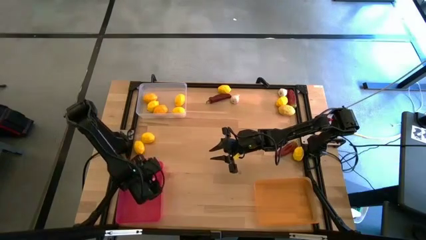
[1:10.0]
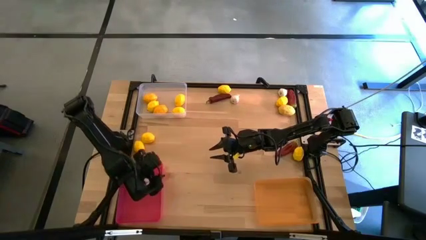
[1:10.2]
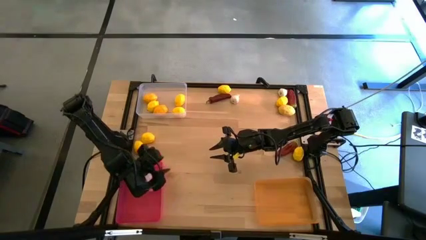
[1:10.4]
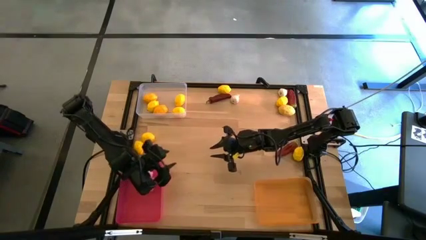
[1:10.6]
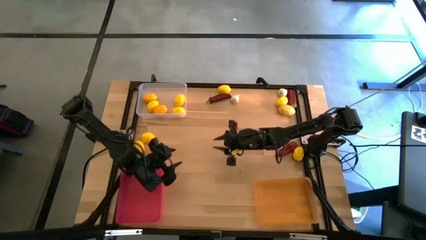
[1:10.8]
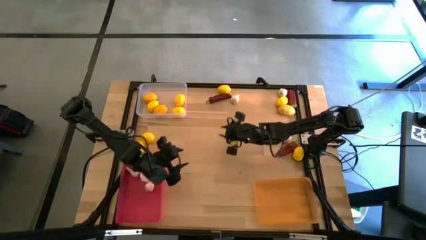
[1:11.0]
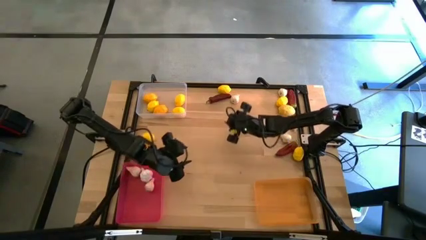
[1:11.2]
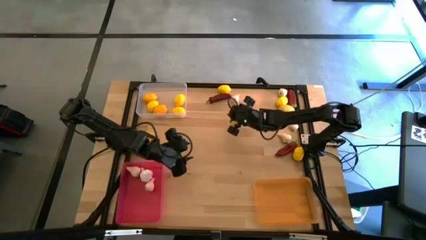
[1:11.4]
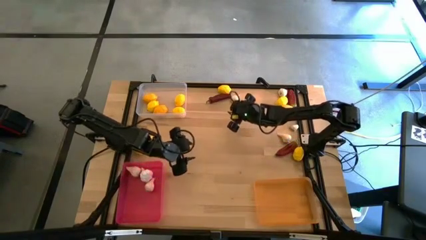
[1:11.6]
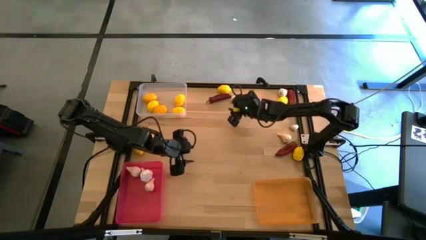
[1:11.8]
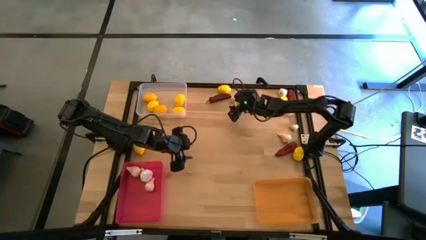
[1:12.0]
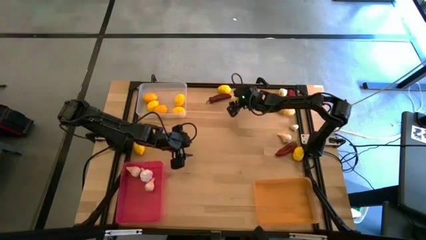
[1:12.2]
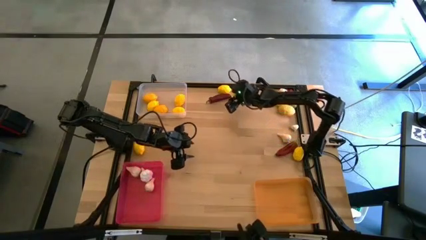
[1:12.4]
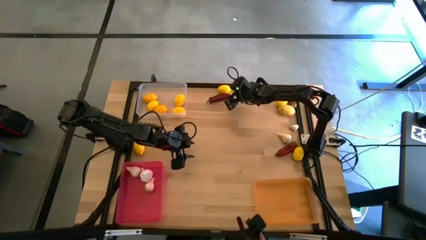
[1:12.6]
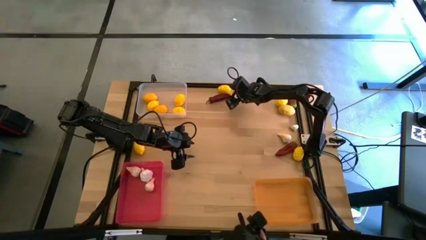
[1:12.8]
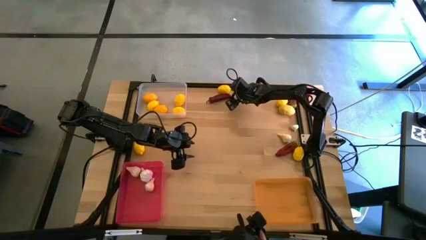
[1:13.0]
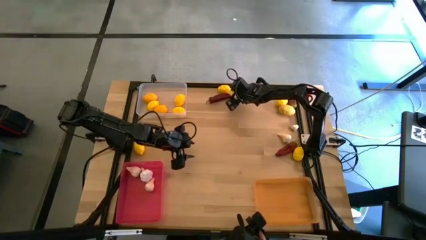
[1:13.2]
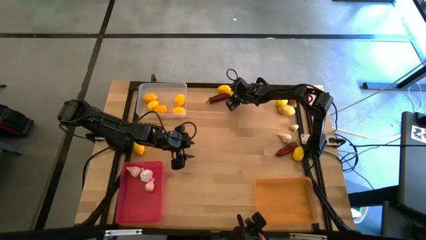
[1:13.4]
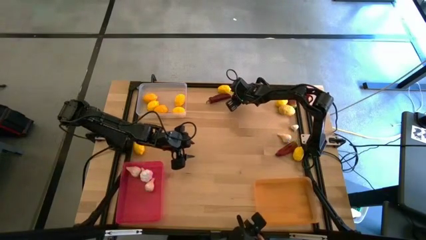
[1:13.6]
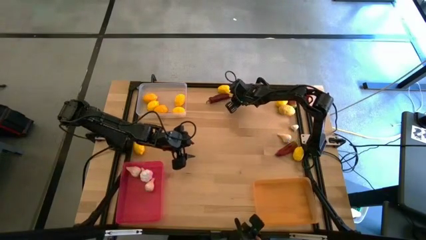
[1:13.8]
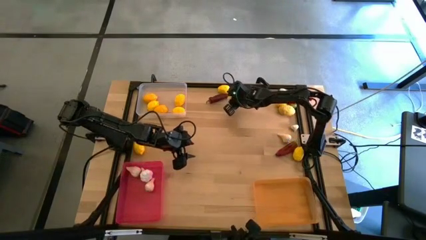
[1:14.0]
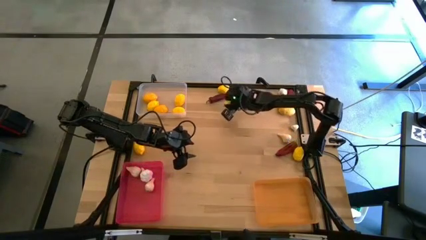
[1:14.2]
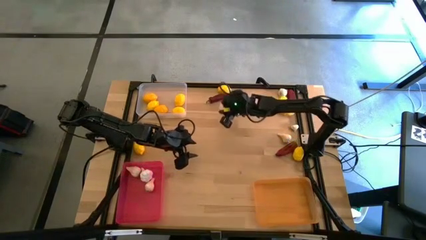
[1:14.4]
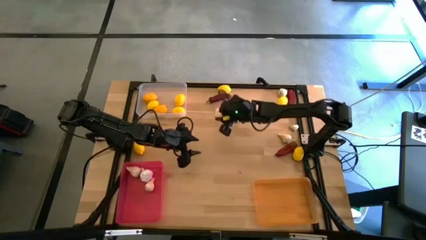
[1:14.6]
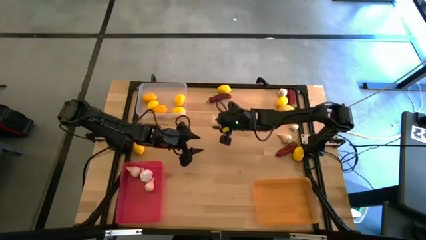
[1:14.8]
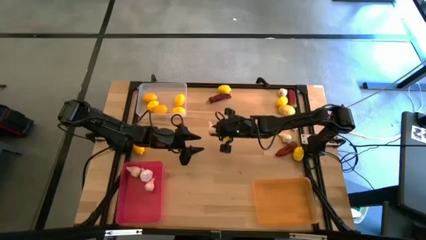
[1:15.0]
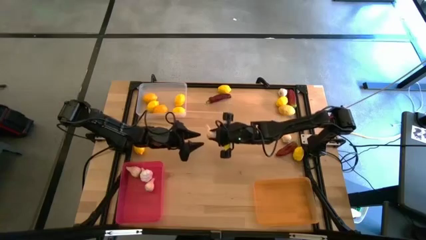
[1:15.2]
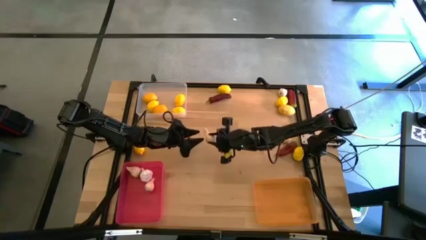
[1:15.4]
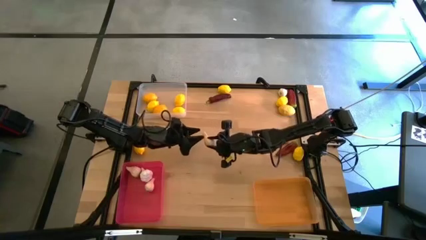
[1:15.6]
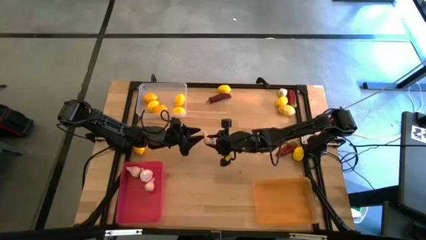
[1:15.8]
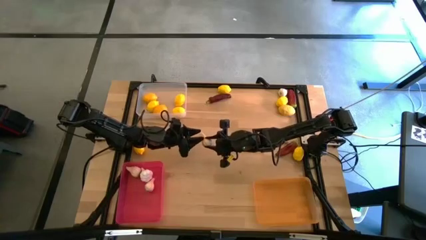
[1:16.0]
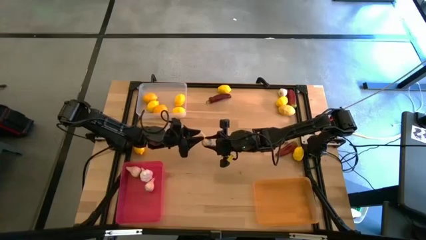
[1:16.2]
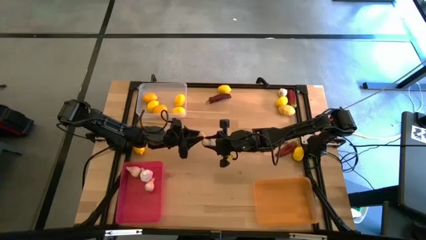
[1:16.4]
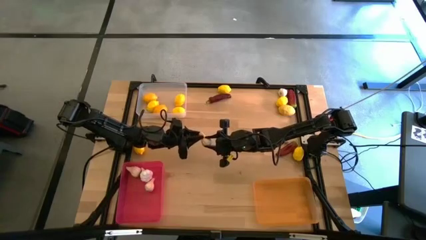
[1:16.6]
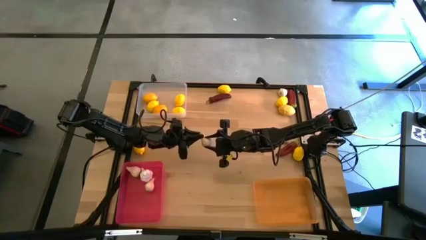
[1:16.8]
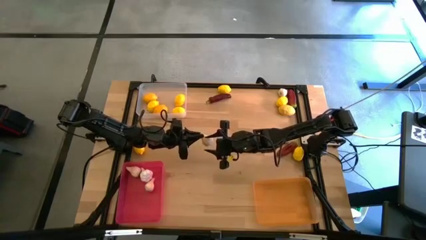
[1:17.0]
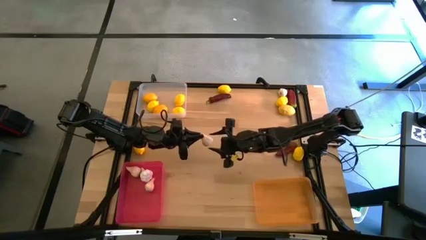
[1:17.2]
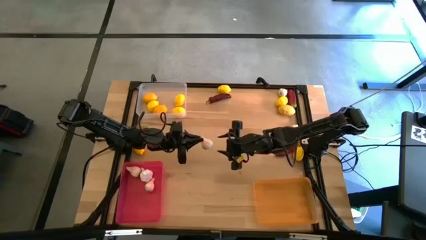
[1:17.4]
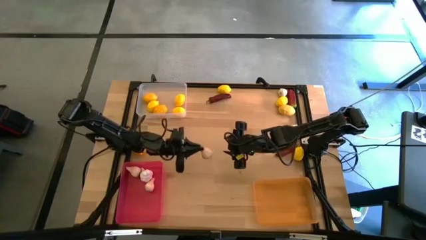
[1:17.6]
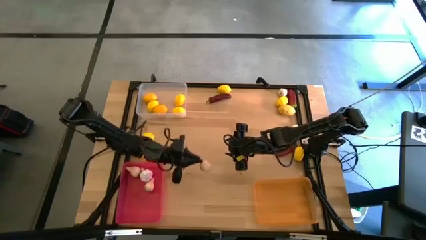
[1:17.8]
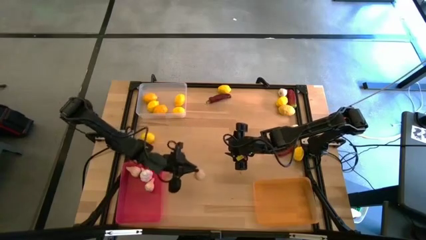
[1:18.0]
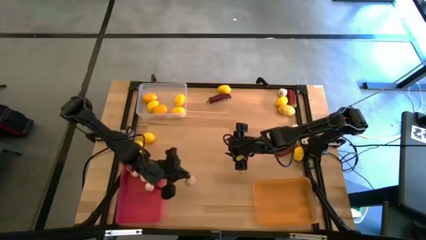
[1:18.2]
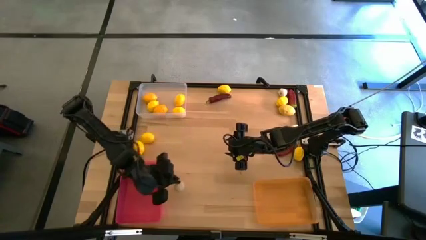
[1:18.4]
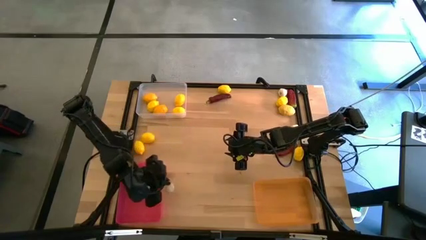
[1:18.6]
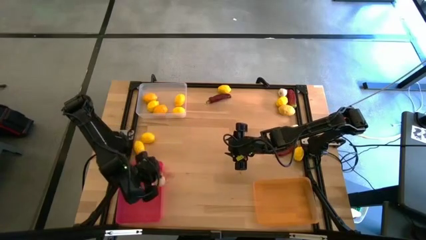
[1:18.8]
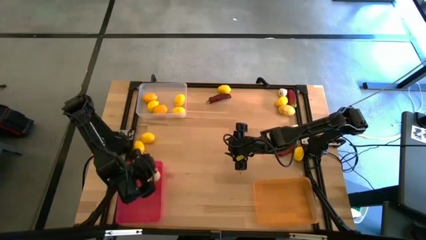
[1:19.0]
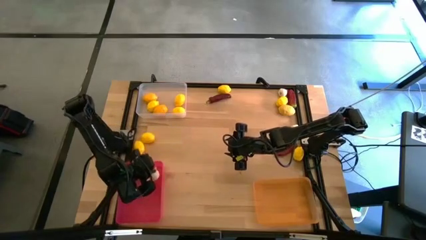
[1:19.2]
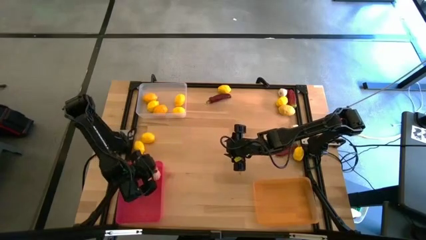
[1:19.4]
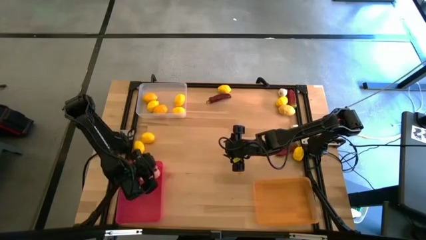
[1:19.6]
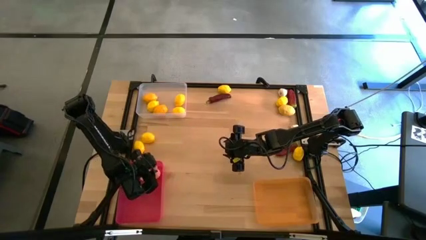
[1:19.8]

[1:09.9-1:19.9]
Task: Sort produce into baskets
Put the white garlic into the bottom left red bin

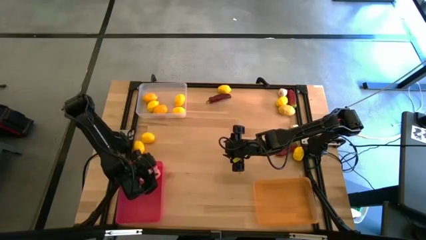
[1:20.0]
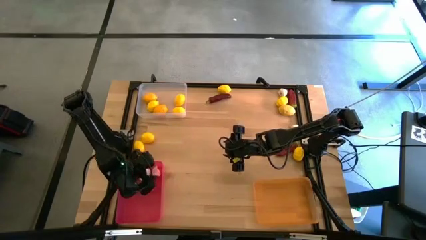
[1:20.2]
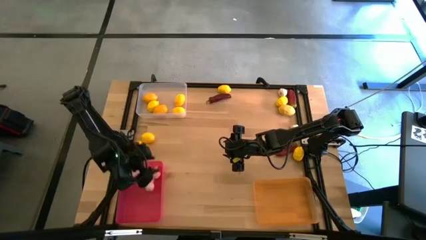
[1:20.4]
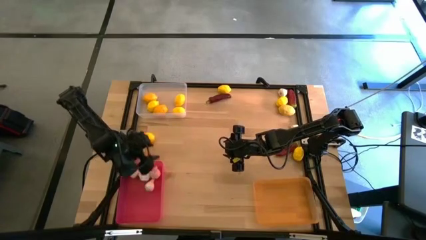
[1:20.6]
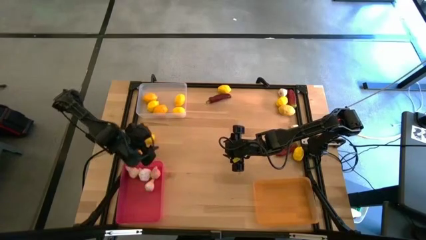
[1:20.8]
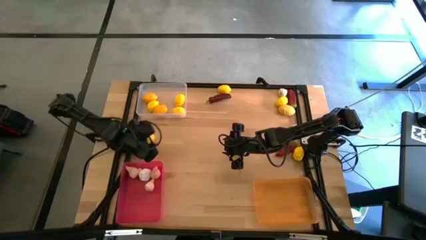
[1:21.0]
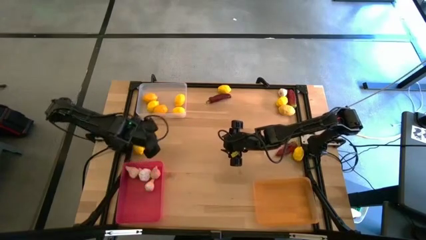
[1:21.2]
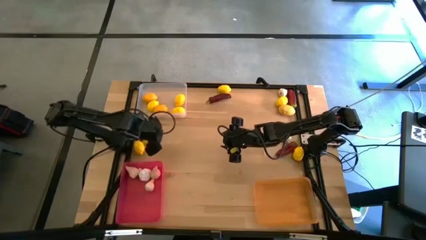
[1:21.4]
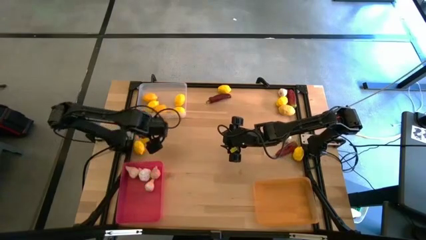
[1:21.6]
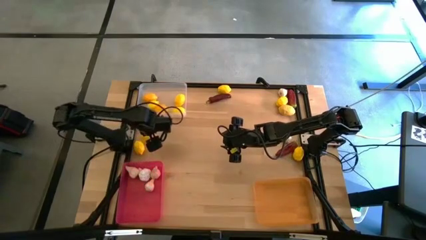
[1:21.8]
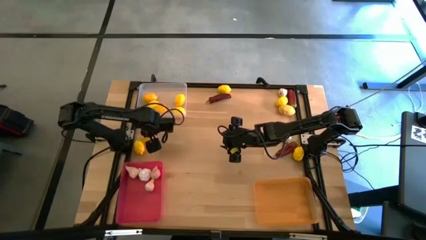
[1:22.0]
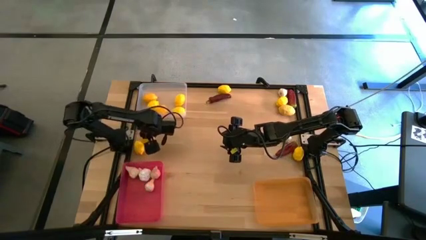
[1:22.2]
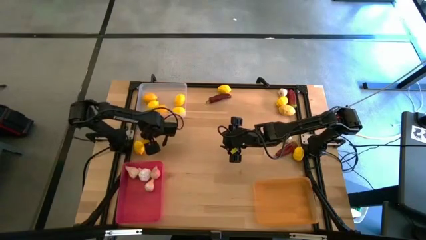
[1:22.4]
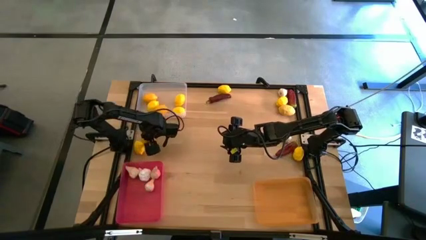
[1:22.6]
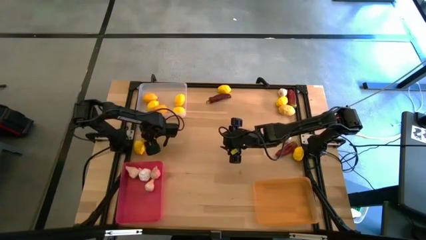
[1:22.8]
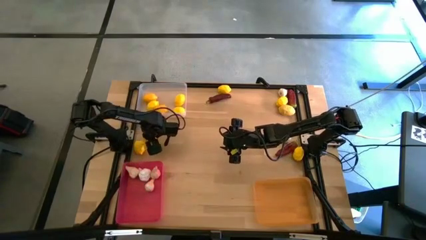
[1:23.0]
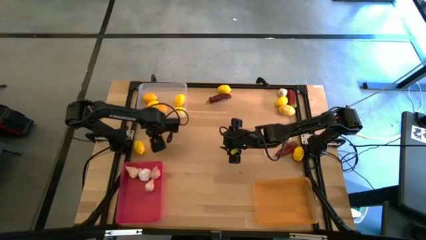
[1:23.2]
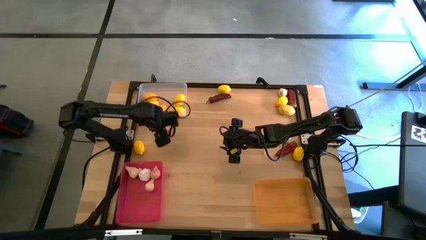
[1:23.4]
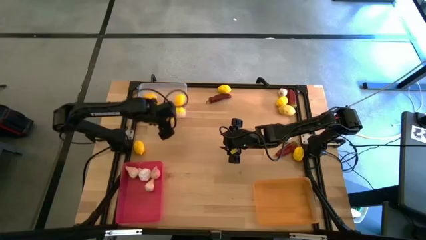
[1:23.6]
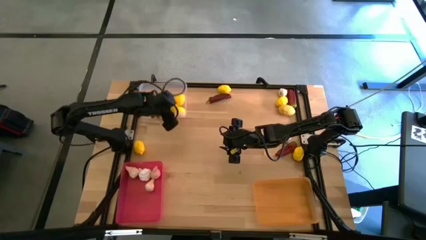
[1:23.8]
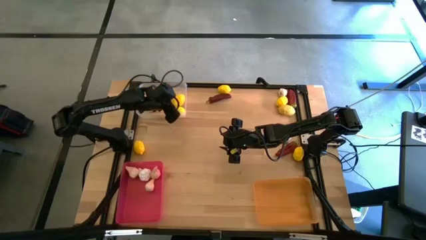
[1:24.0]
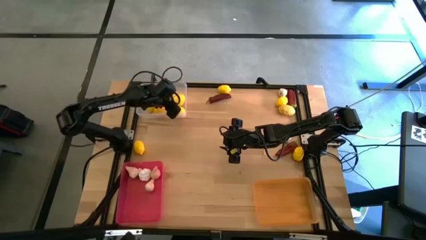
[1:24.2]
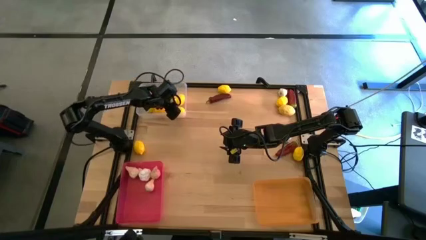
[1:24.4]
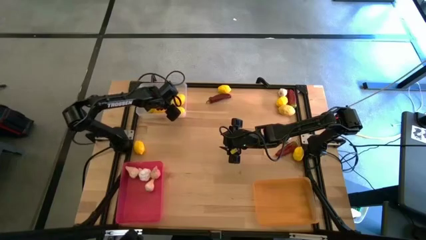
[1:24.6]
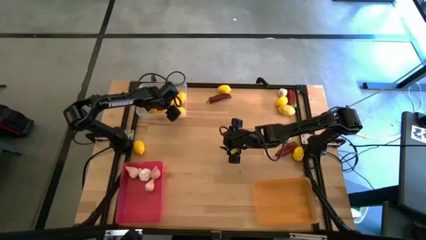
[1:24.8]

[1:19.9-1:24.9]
Put the yellow lemon into the left white bin

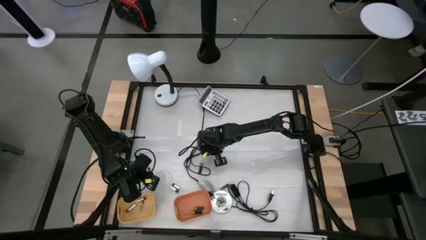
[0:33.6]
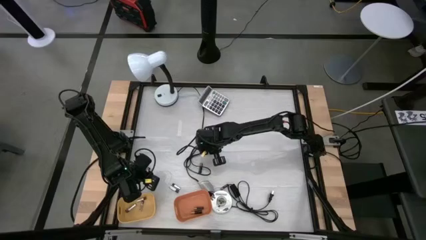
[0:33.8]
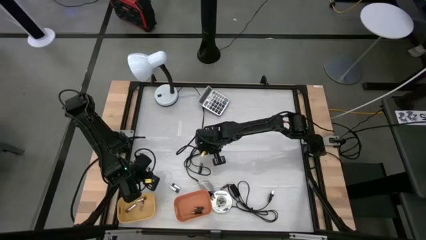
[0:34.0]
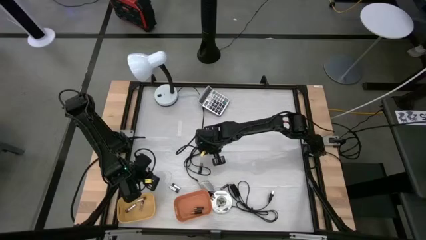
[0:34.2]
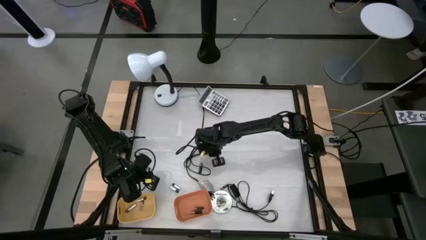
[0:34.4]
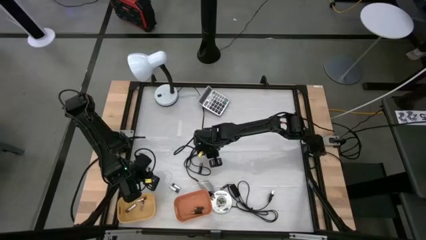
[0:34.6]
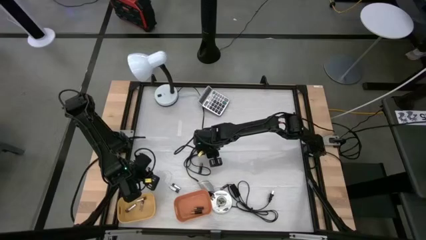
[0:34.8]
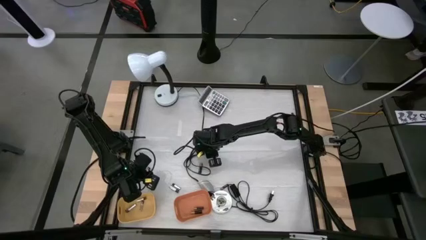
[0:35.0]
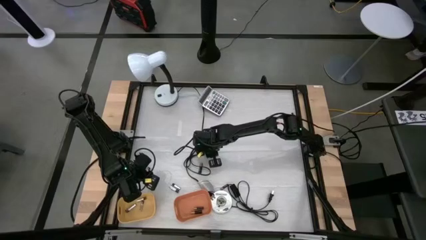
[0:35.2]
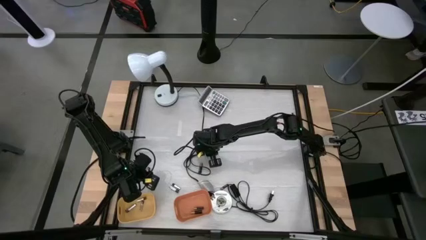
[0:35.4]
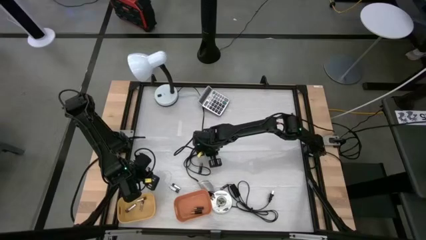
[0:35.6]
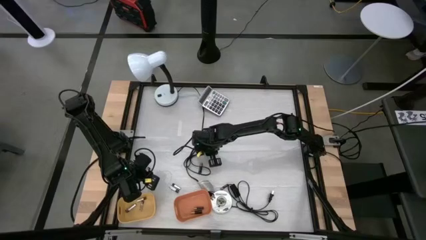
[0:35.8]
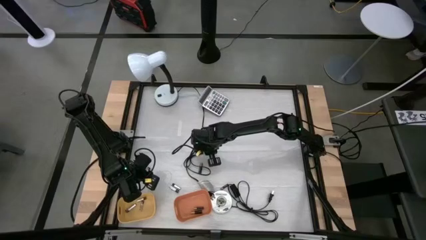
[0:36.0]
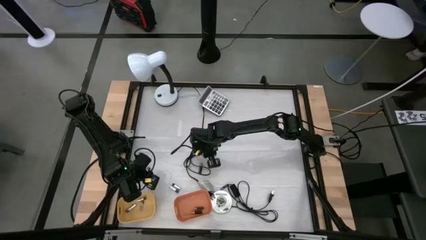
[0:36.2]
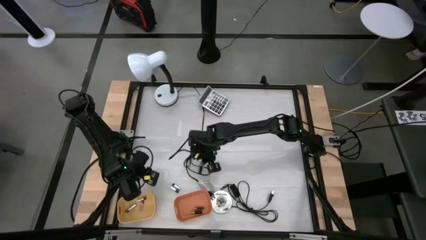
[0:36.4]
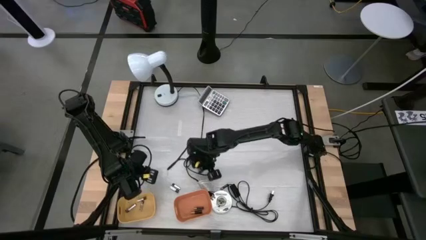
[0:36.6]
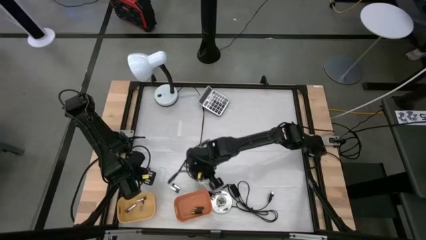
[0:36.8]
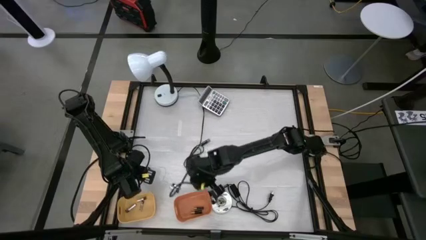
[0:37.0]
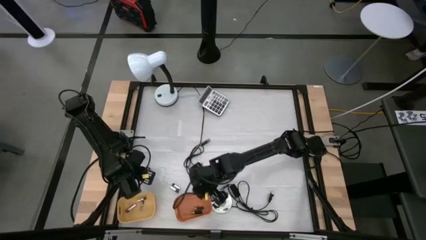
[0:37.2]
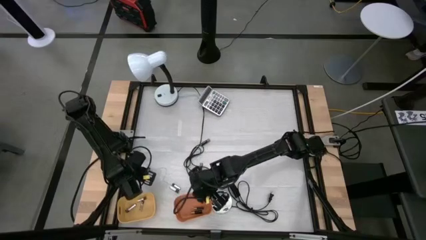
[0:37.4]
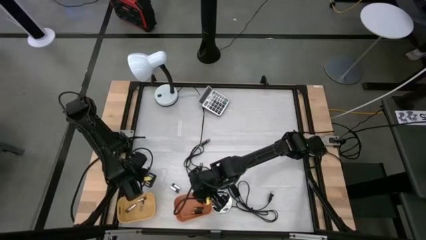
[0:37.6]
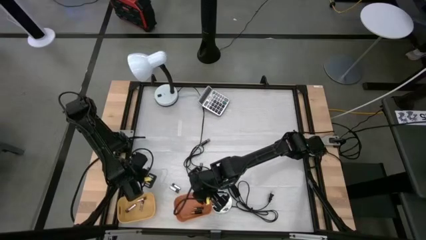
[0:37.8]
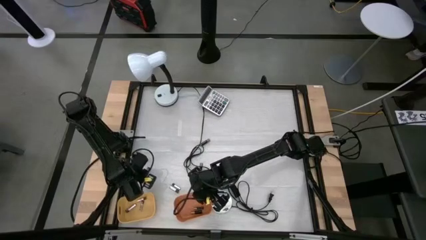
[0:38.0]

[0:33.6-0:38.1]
Task: Sort batteries
Put the black battery into the orange bin
